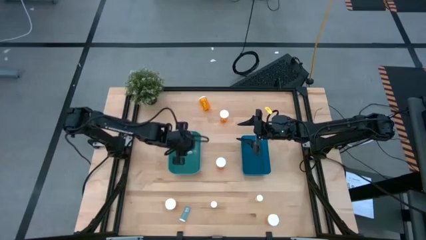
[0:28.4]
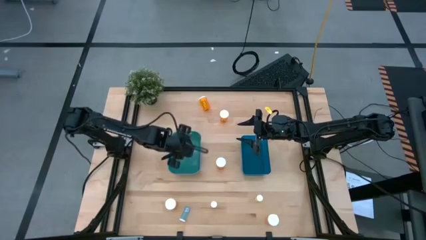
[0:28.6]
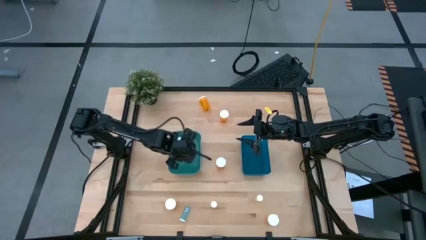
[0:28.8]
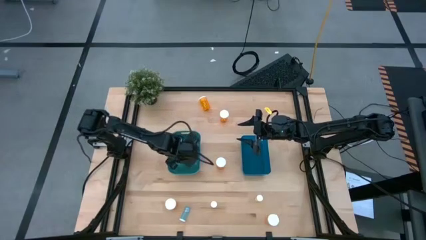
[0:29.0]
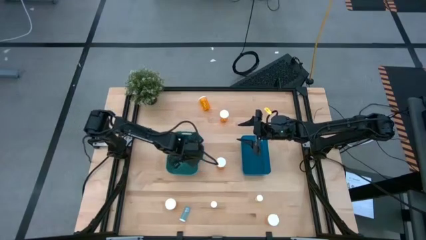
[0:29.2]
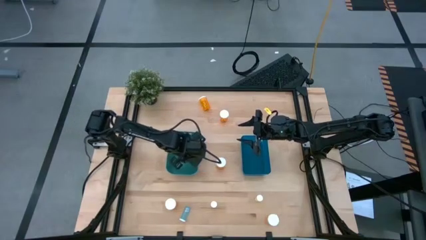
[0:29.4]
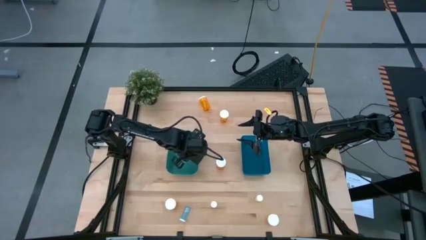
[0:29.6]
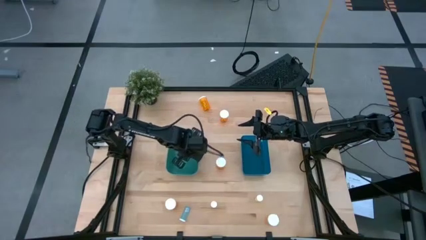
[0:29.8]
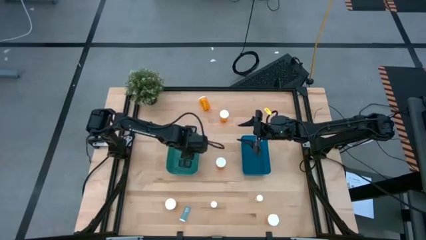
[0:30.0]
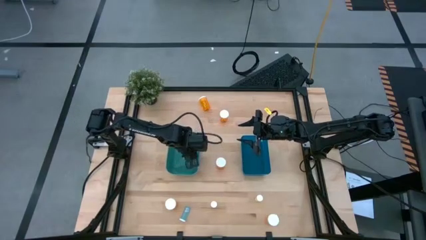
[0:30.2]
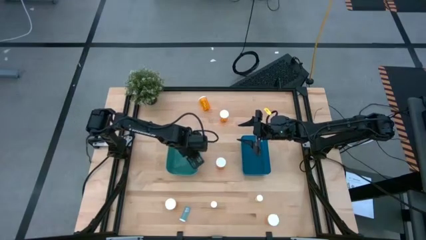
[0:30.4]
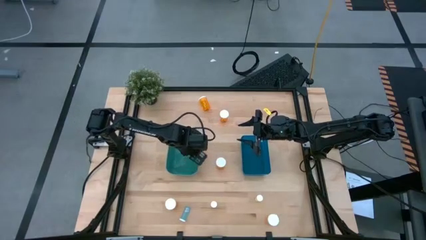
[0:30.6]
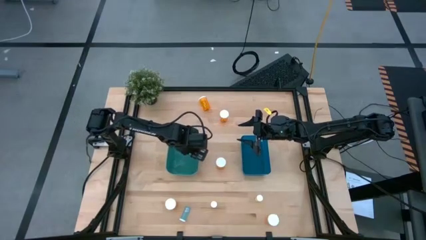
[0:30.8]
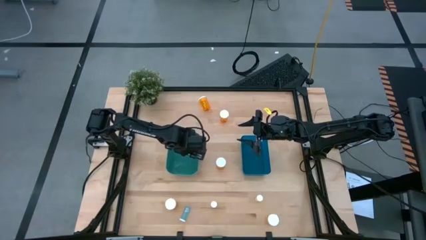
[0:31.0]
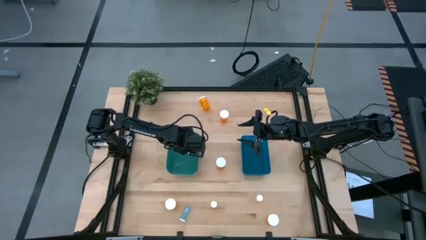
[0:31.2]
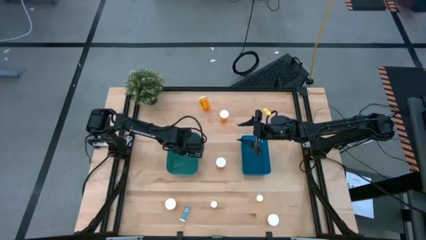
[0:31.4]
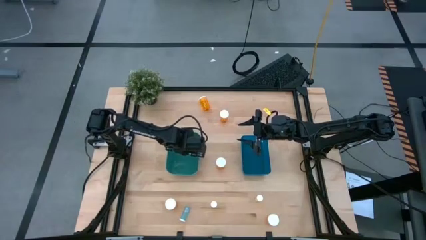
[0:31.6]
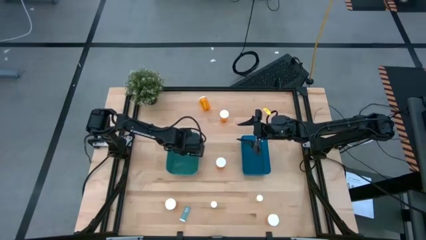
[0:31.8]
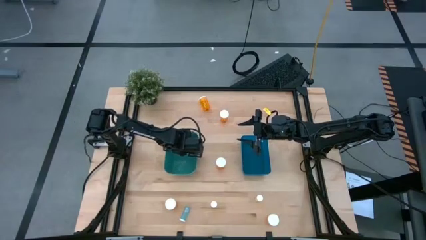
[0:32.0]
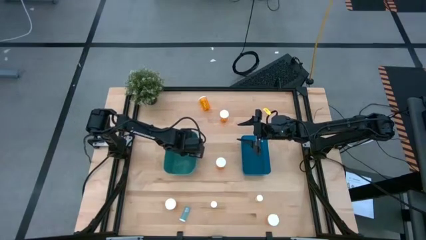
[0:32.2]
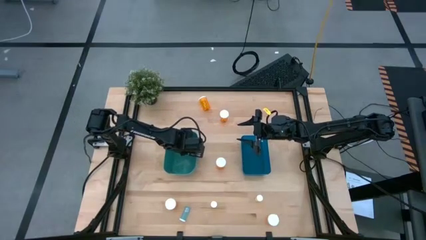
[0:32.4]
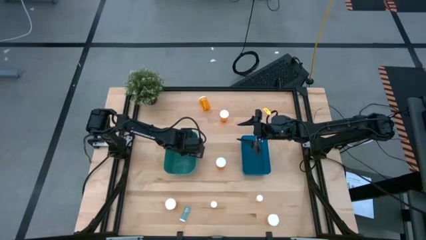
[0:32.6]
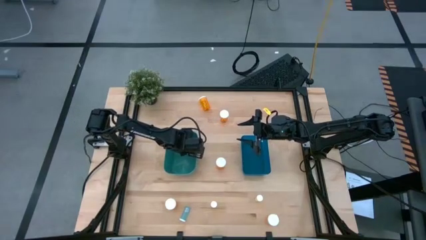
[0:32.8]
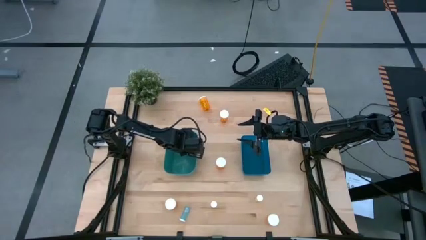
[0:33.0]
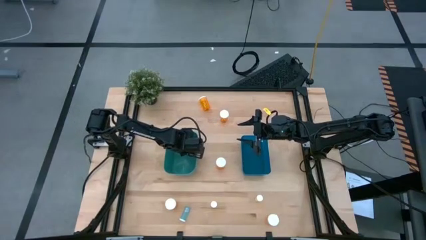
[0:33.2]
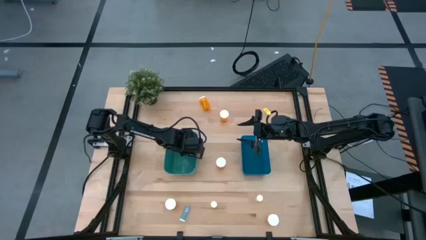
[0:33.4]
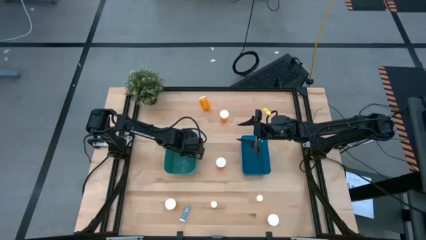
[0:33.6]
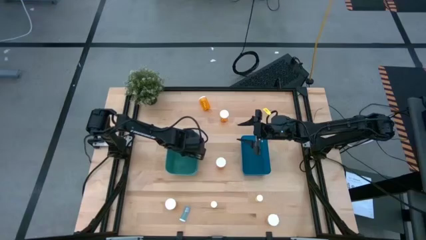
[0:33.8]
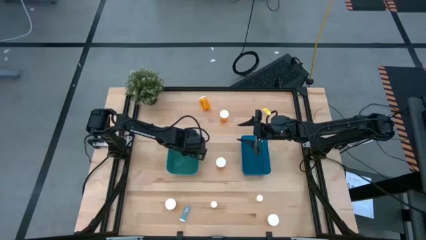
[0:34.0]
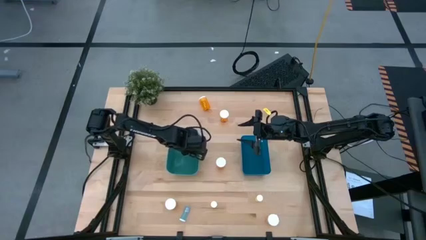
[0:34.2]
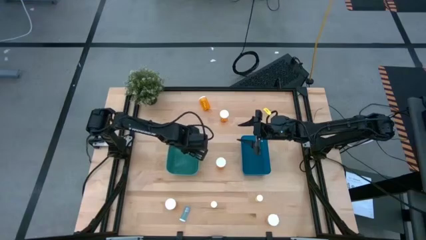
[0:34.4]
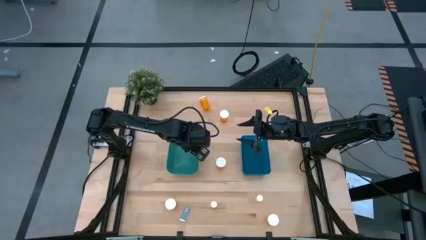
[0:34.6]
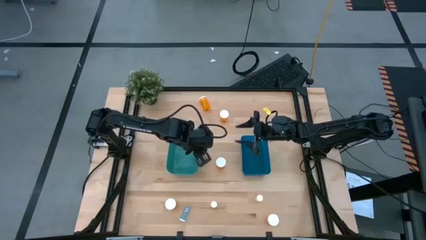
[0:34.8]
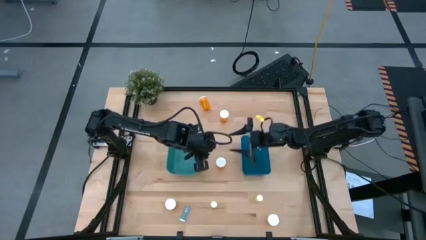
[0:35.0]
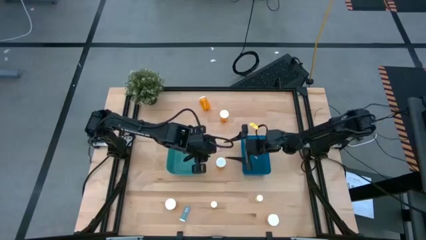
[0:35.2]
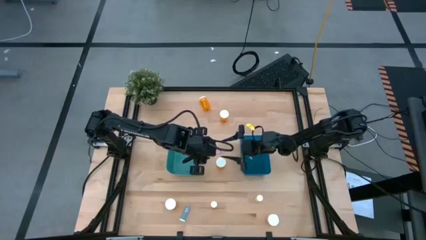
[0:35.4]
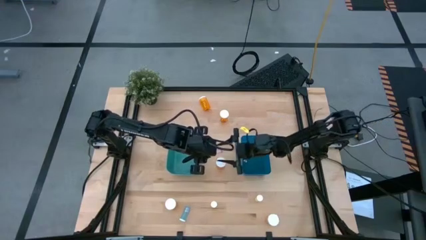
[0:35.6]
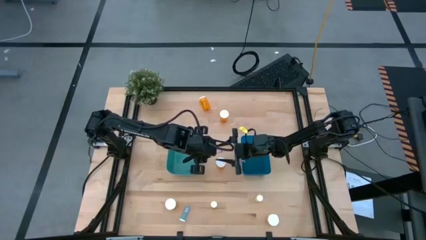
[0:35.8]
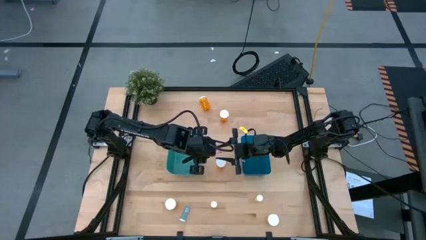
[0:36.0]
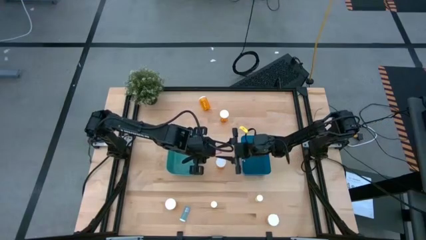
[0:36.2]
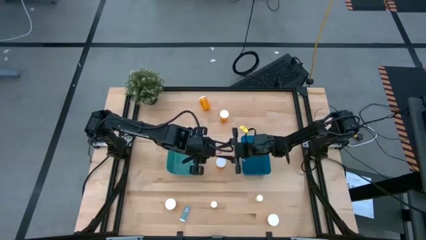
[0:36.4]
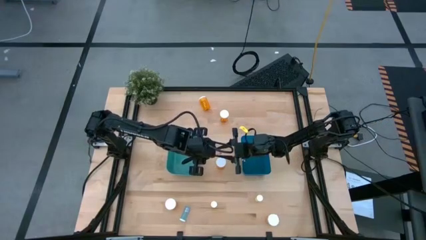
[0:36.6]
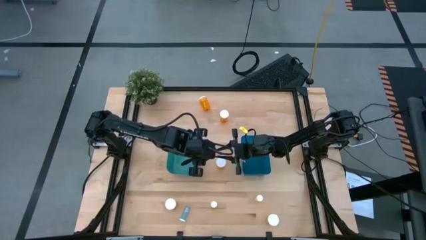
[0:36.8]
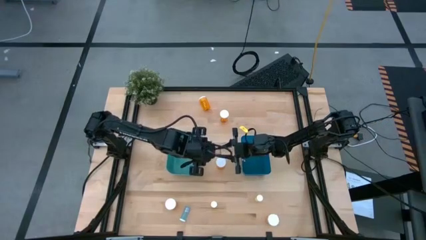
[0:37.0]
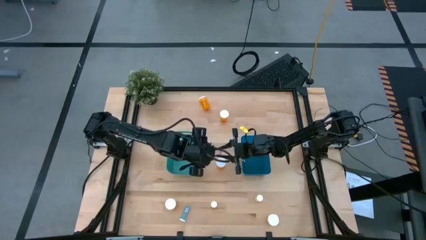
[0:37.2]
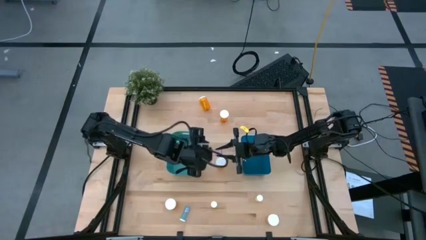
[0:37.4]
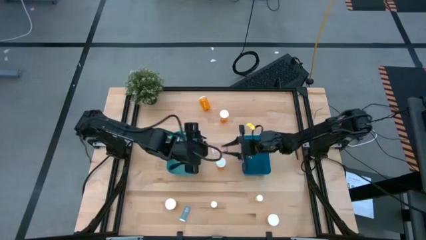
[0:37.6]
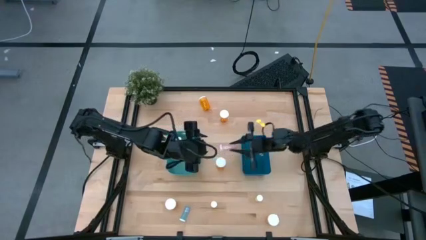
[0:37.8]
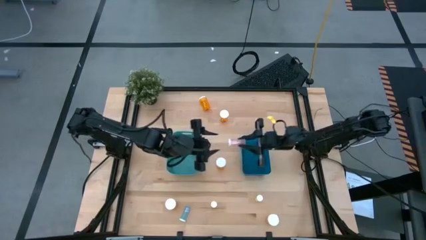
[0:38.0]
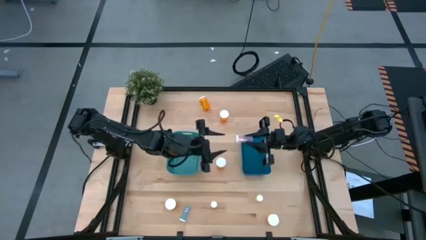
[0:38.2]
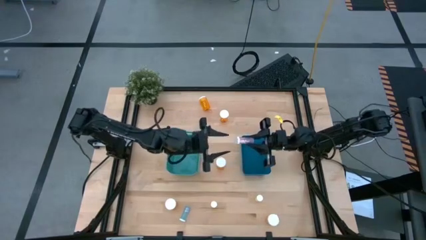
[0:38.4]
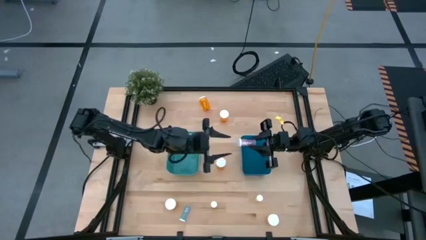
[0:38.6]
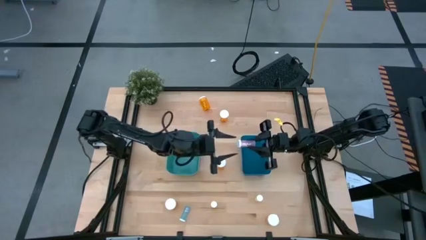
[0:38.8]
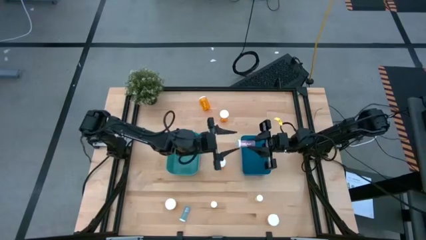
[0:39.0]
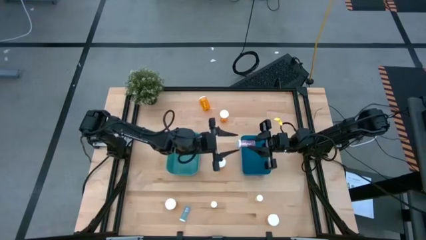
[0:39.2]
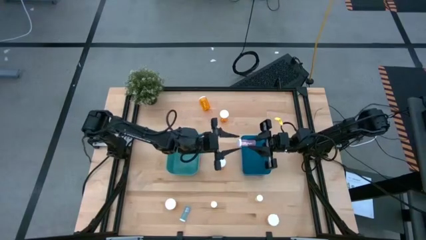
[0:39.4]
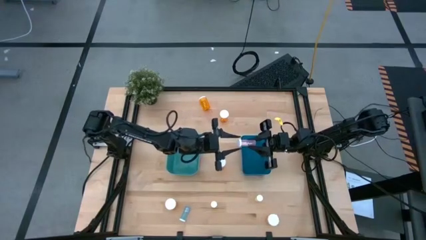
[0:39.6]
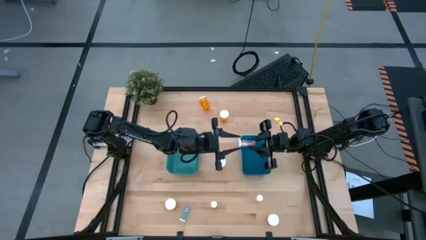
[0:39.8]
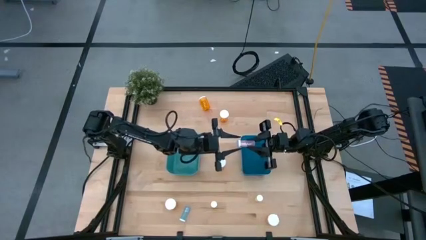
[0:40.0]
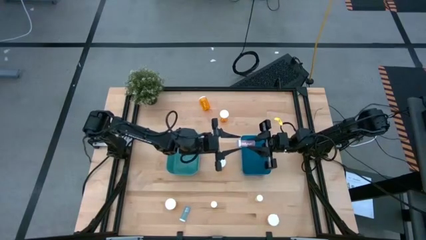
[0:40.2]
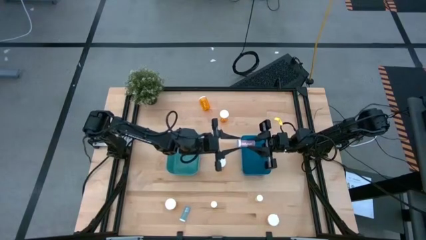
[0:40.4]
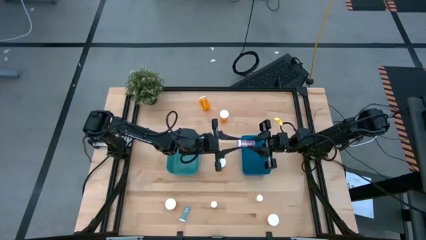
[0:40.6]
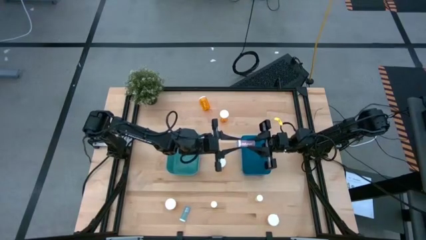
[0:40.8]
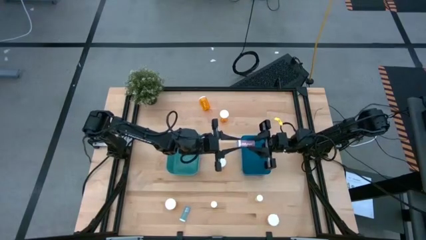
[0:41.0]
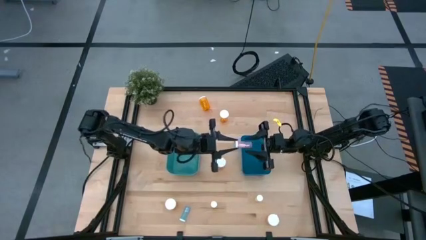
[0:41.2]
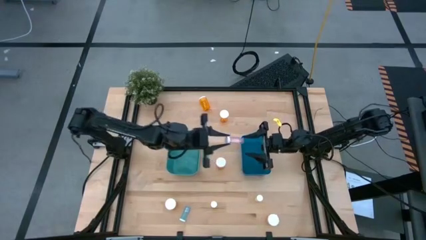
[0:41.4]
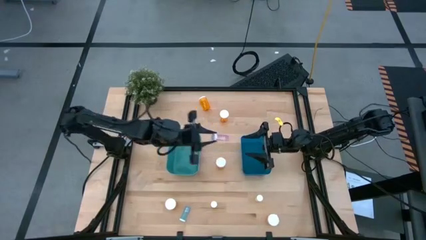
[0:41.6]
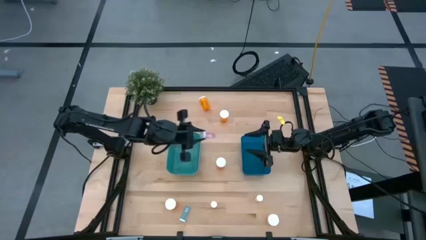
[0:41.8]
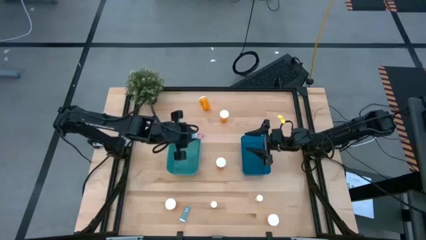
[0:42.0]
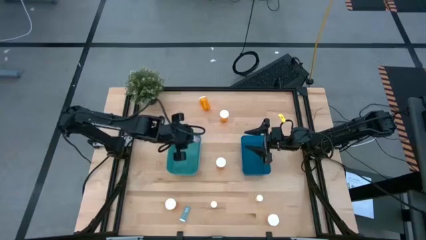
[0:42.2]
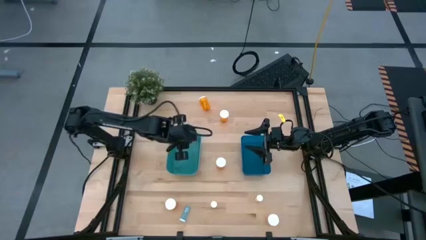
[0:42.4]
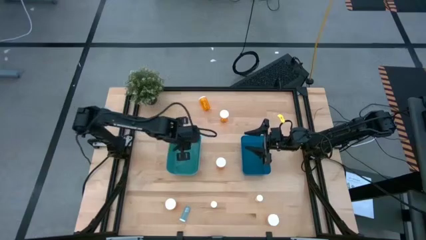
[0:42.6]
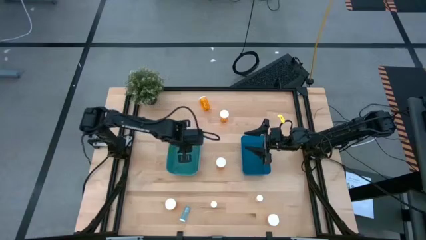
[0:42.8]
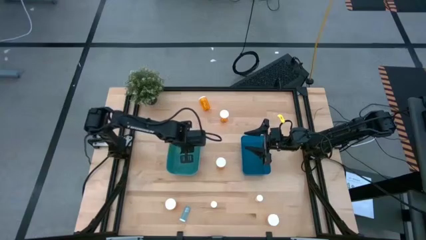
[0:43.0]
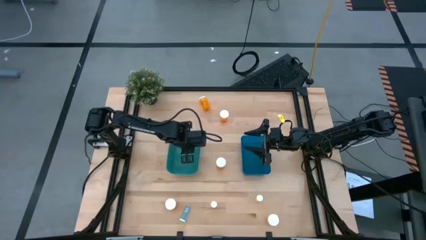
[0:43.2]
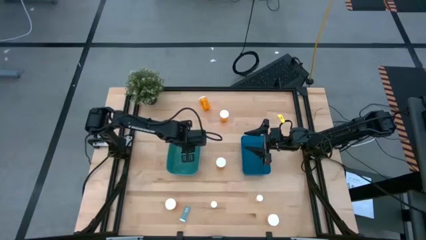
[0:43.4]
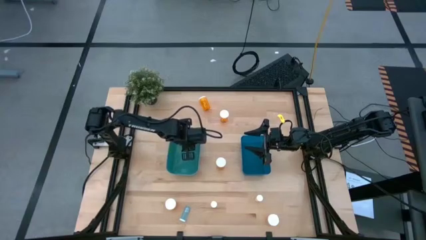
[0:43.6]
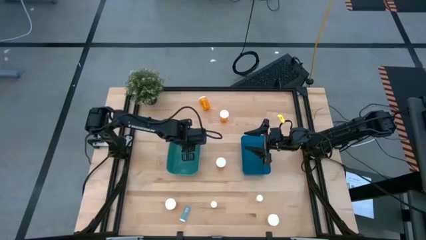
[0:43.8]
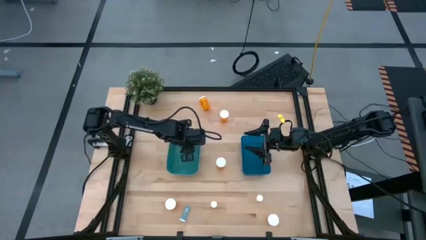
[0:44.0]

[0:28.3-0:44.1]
Task: Pick and place medicine bottles into bin by pill shape (circle, oval)
Put the small pink pill bottle into the green bin
